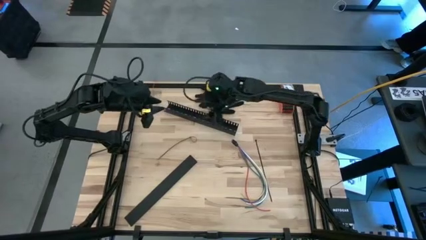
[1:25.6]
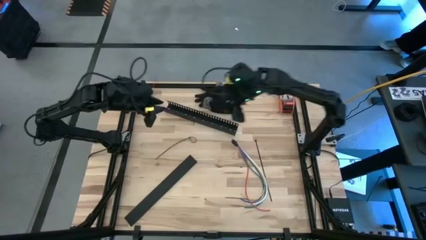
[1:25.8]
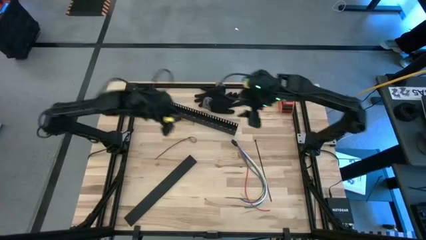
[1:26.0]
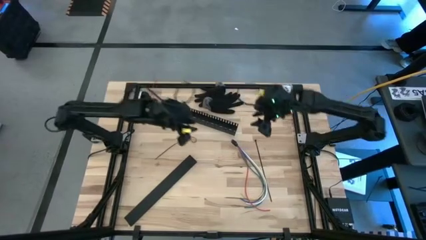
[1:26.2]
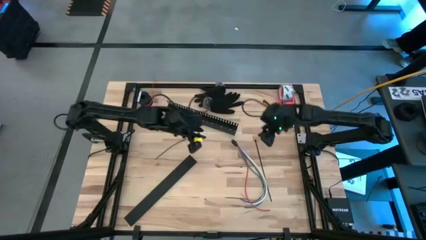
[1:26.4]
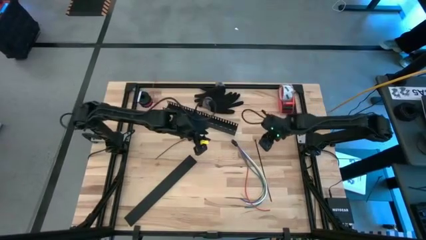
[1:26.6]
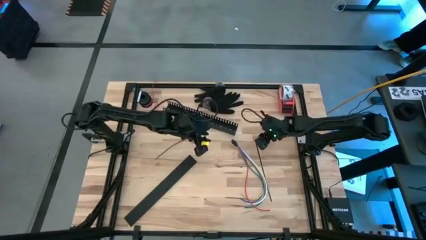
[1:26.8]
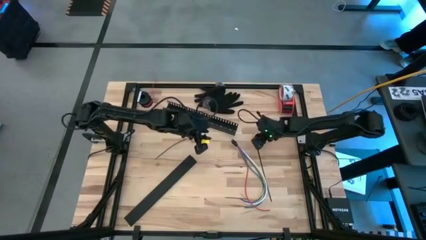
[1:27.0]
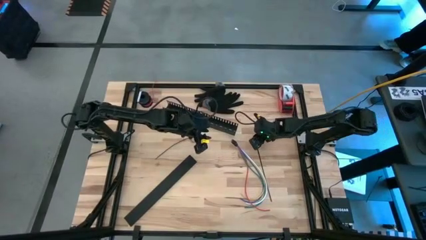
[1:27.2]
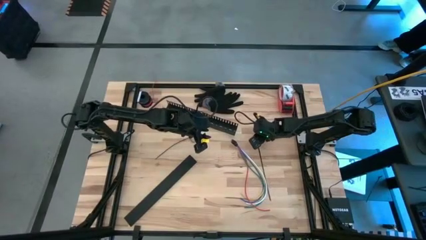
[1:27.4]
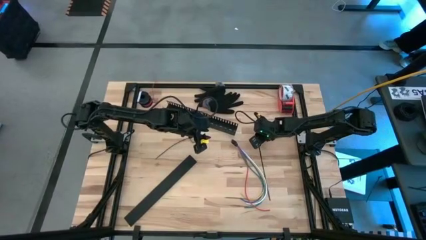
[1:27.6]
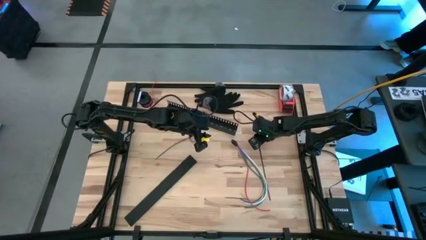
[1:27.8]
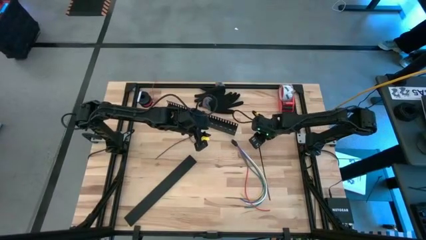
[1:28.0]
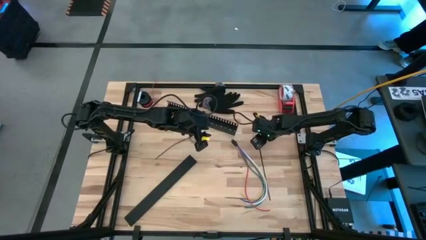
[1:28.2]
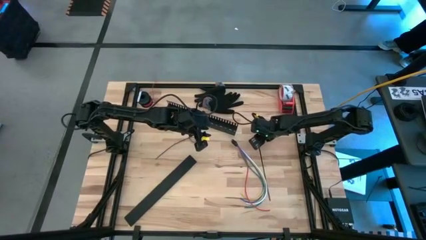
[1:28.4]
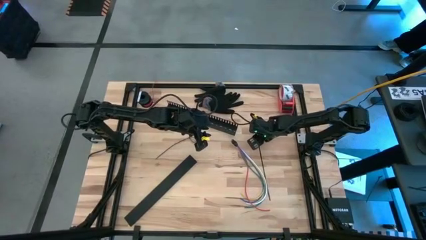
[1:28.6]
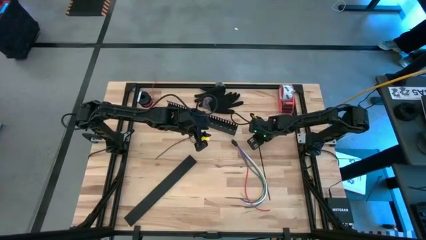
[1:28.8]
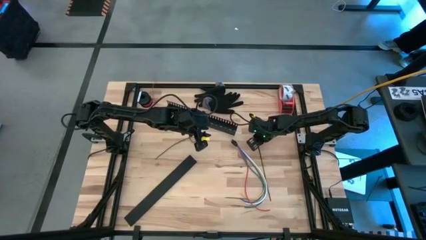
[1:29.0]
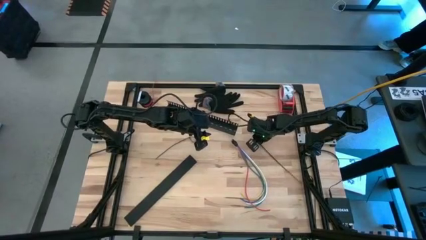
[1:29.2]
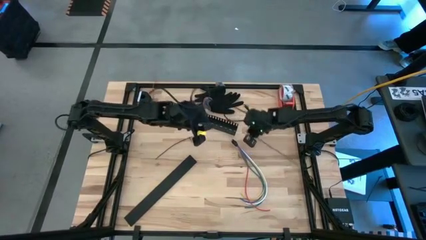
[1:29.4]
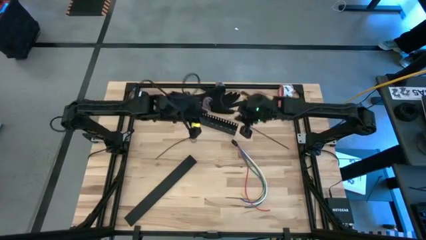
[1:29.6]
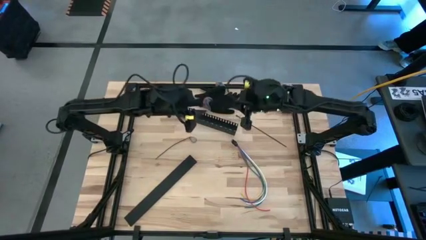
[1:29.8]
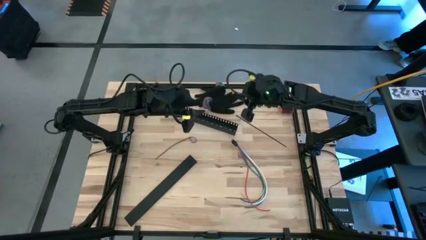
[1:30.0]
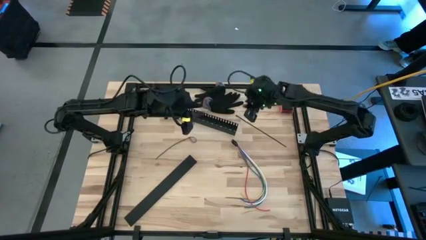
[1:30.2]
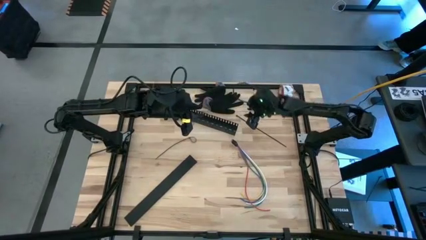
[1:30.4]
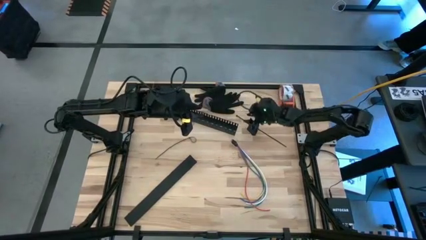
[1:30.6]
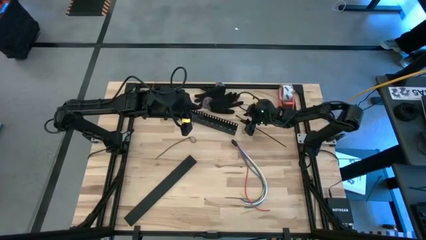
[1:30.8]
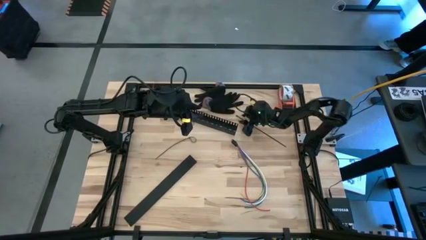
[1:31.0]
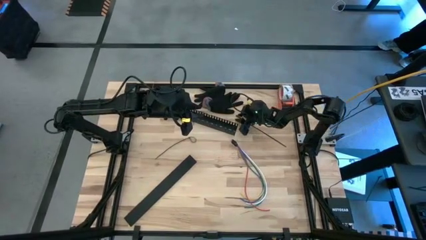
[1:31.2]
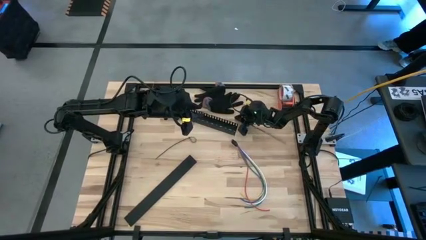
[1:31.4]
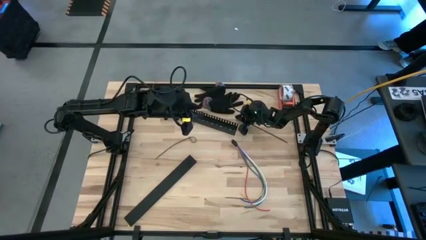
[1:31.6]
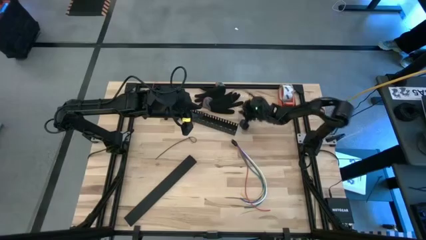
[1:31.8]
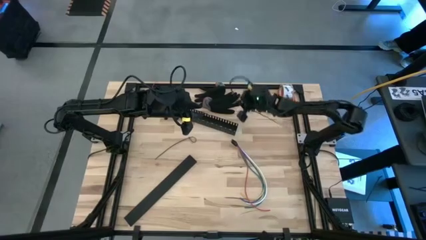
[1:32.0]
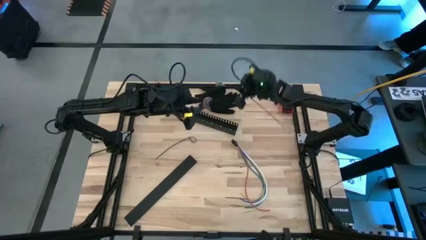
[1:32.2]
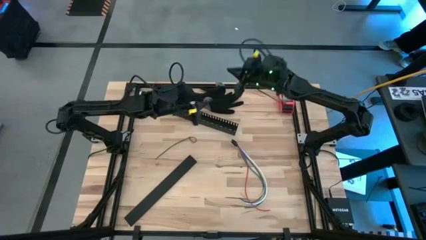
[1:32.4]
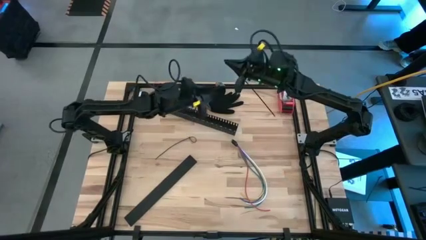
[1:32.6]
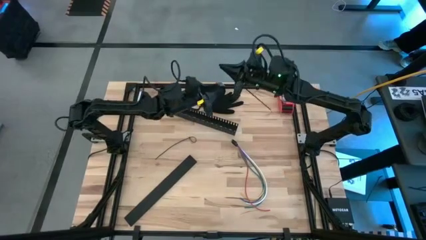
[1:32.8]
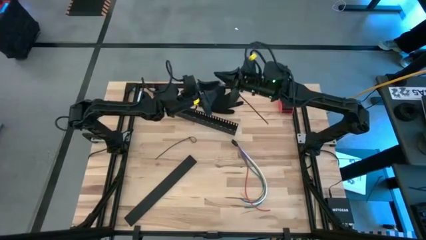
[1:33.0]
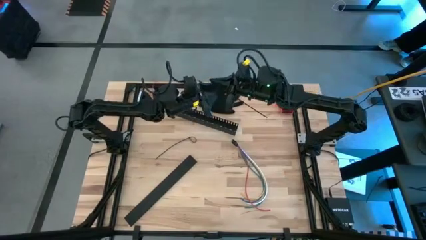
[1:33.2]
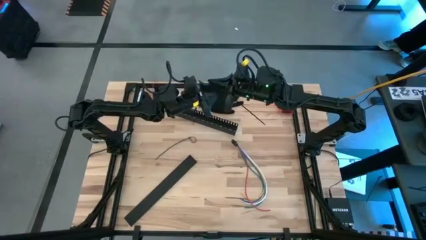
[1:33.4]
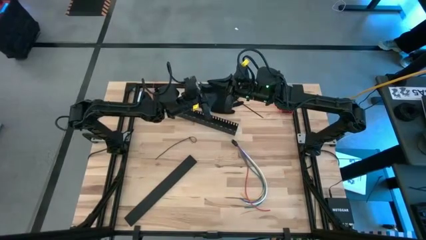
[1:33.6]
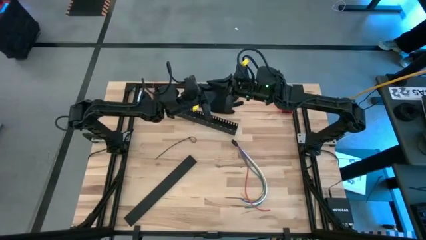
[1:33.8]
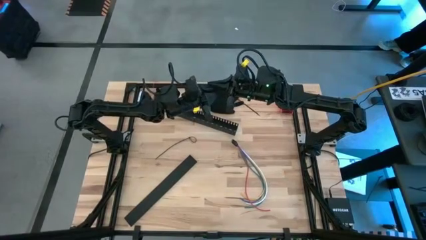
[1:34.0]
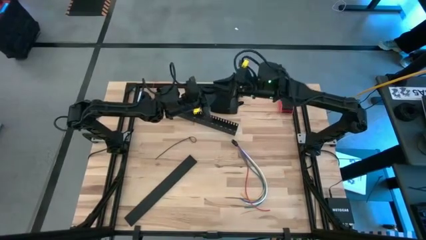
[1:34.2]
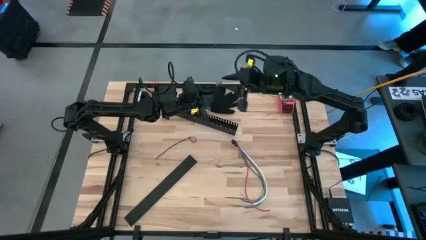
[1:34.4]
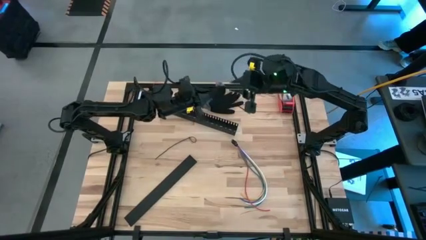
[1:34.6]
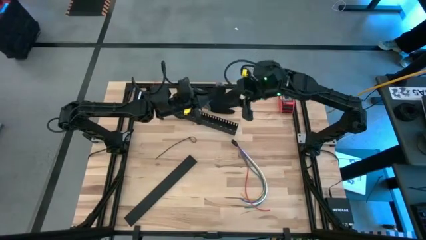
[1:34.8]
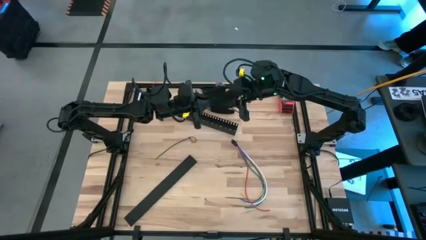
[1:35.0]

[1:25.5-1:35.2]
Task: Ziptie cables
Prepare the black zip tie

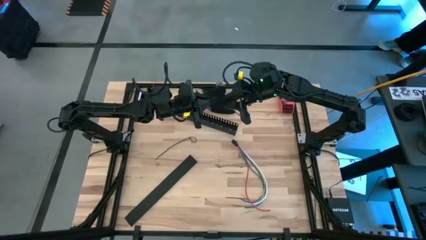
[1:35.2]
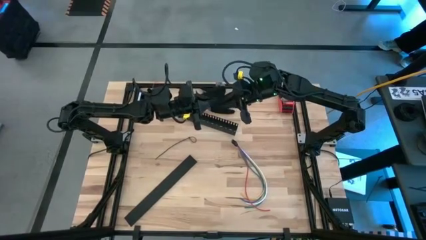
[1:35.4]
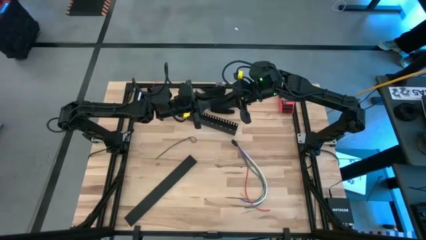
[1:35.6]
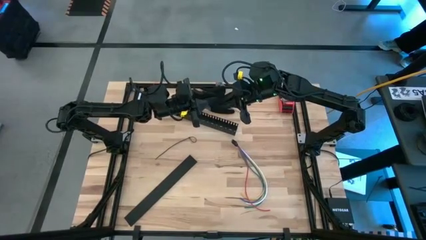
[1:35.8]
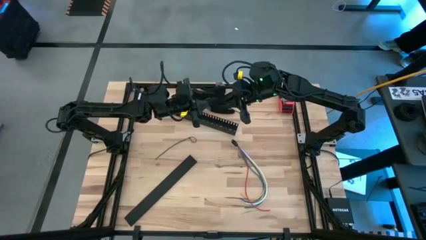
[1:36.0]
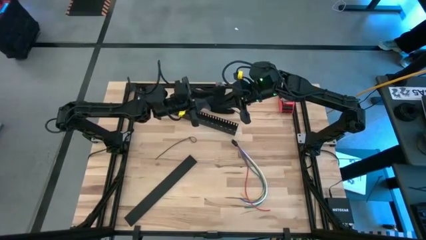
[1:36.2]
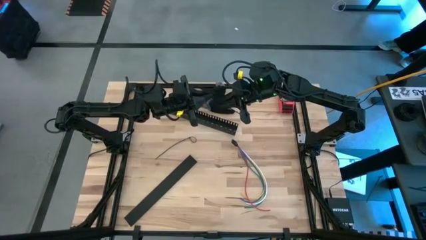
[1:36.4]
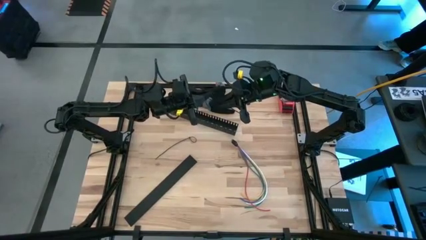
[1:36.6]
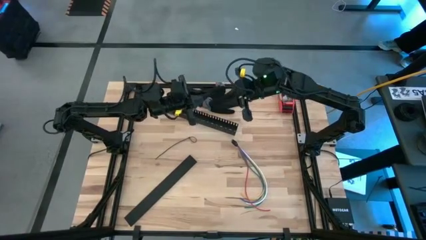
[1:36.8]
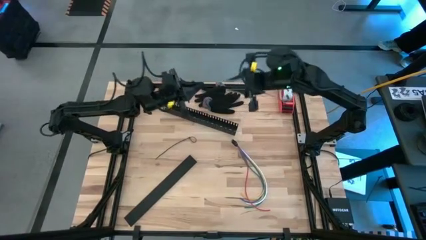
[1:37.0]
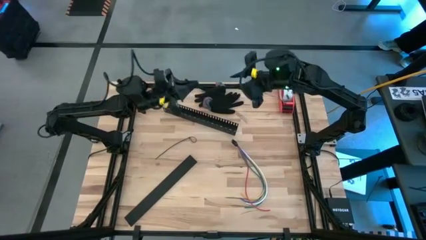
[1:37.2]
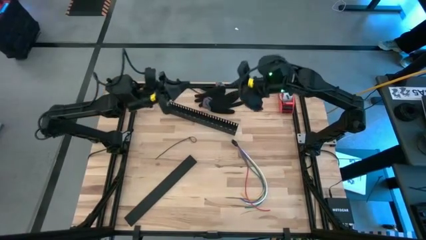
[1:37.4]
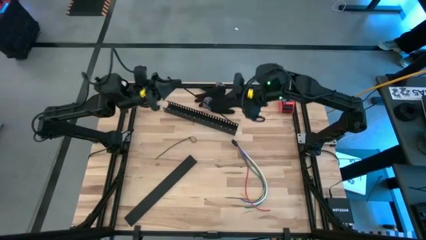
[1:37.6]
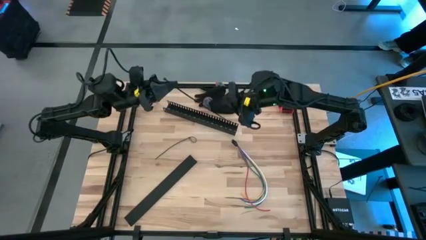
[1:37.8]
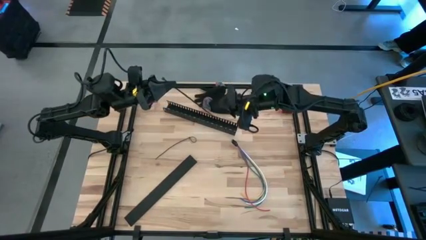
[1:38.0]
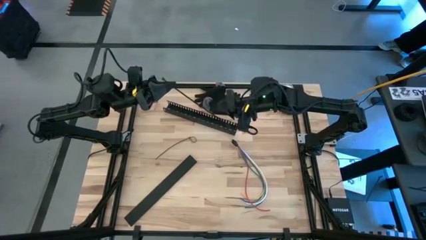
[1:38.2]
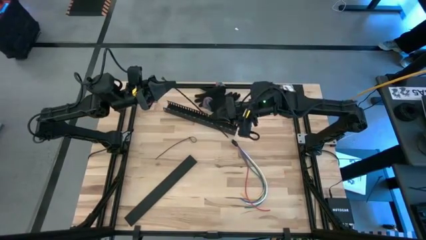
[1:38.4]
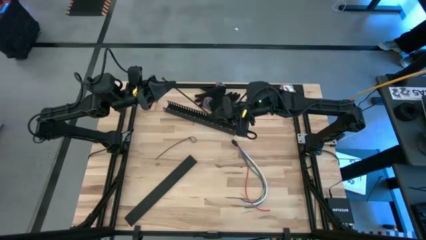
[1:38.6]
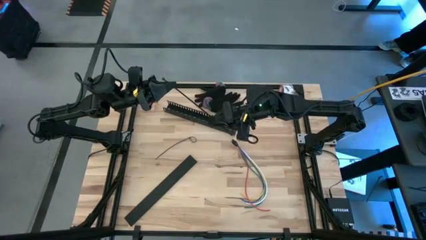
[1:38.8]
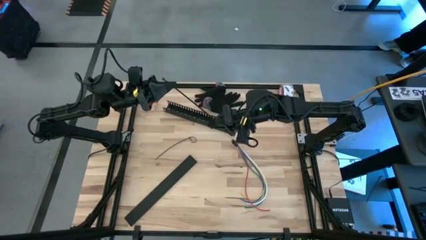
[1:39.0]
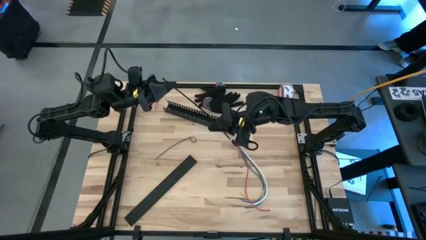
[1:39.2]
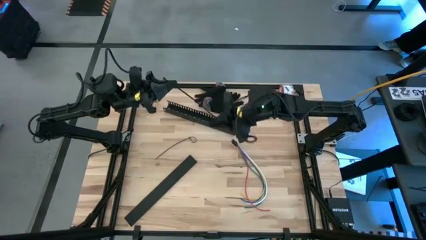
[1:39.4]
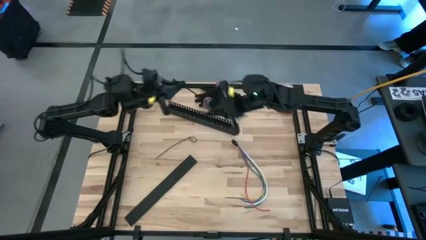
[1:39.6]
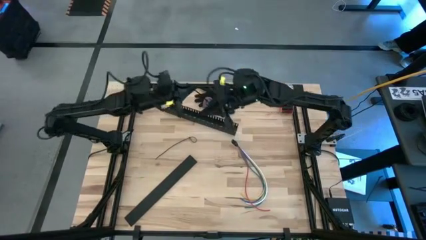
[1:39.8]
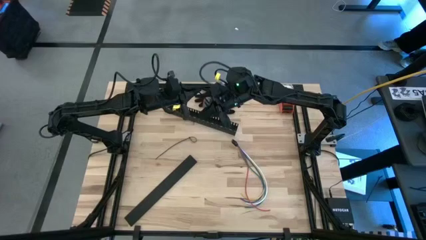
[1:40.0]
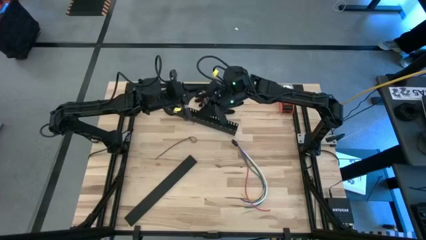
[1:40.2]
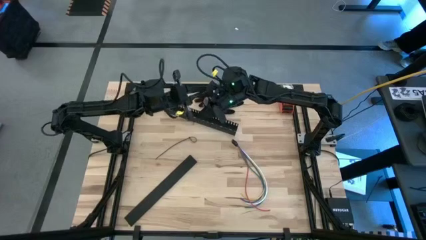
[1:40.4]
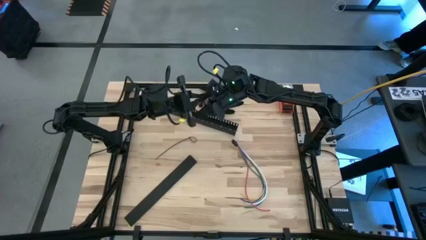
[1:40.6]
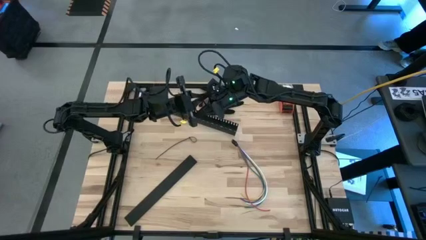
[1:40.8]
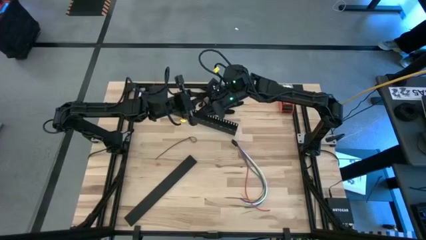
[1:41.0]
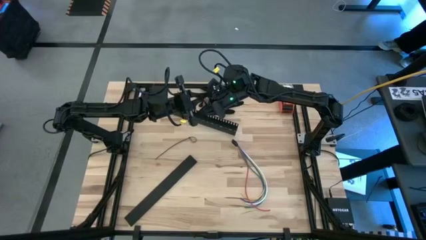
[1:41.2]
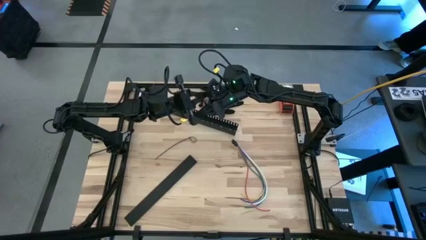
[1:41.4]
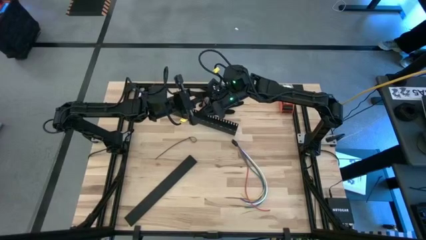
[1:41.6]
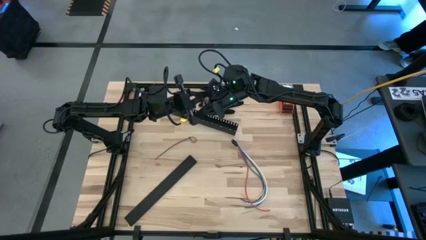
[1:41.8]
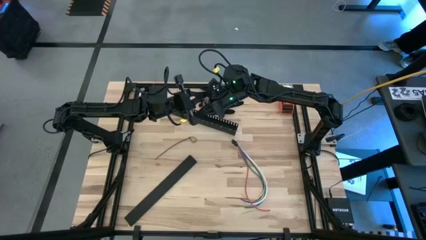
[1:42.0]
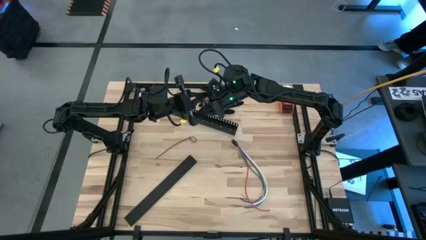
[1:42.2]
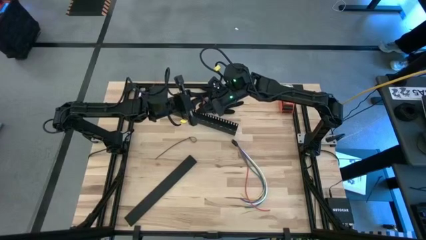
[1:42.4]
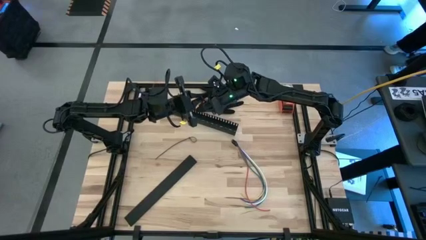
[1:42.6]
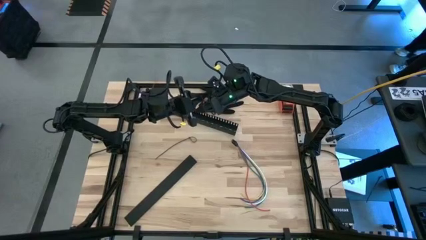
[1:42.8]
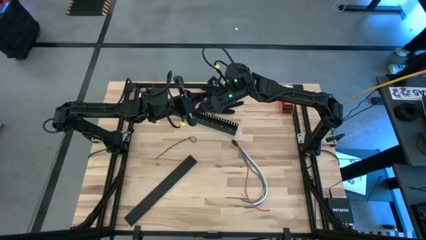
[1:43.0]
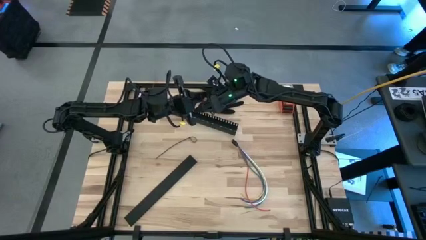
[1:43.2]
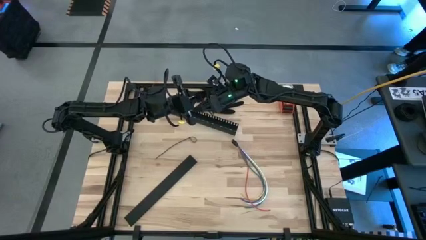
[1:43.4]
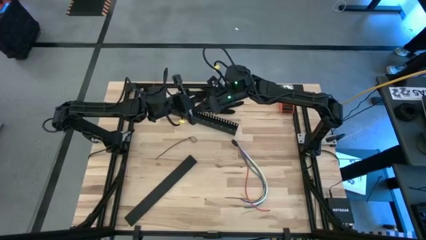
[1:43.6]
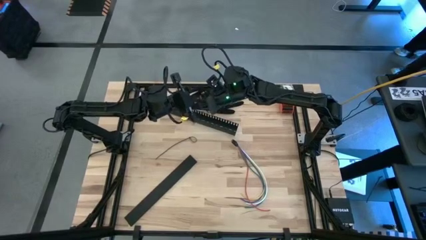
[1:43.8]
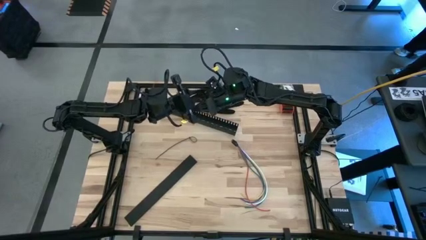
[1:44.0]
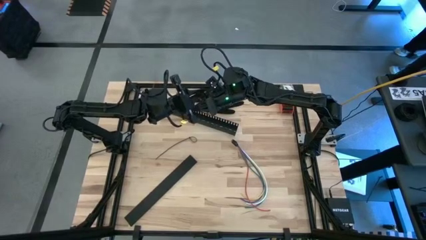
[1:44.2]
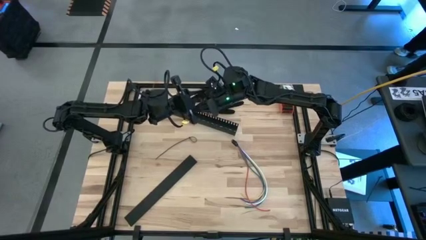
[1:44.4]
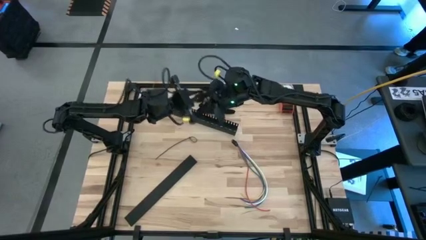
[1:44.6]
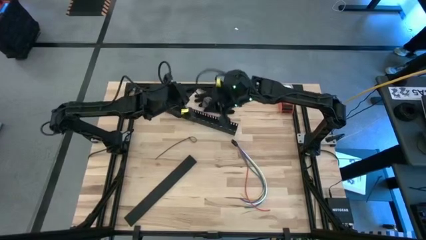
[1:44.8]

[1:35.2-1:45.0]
Prepare the black zip tie
